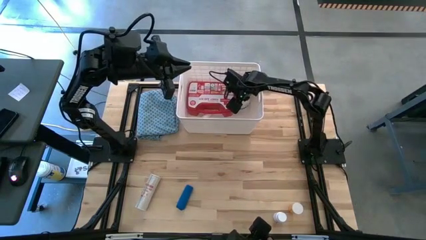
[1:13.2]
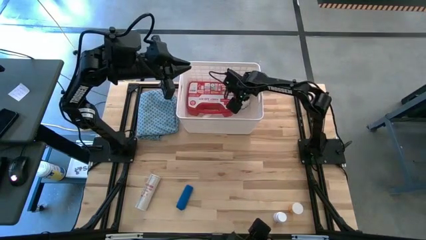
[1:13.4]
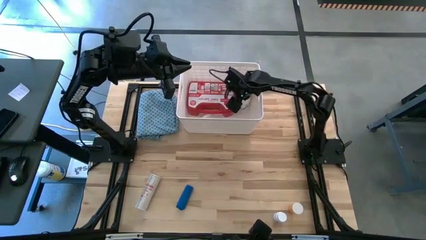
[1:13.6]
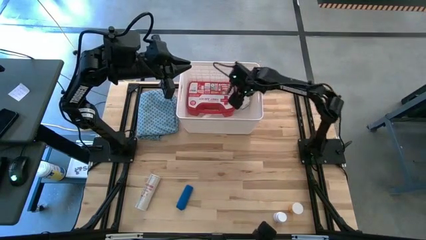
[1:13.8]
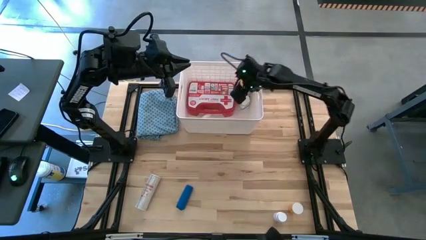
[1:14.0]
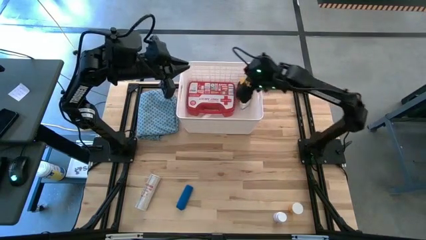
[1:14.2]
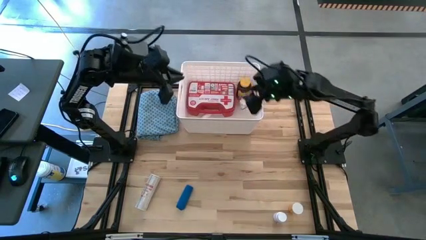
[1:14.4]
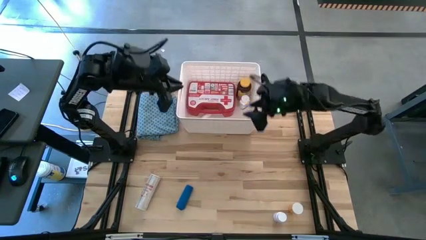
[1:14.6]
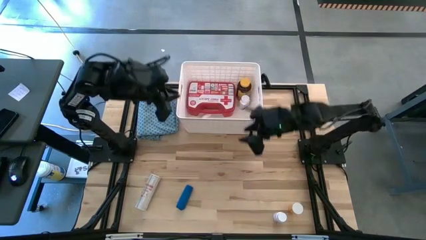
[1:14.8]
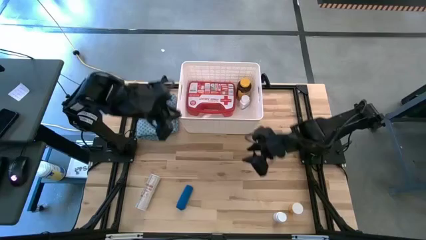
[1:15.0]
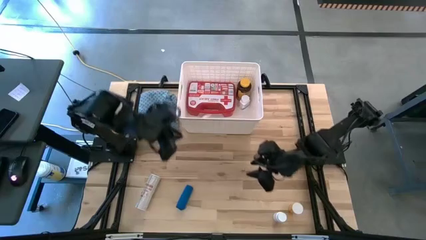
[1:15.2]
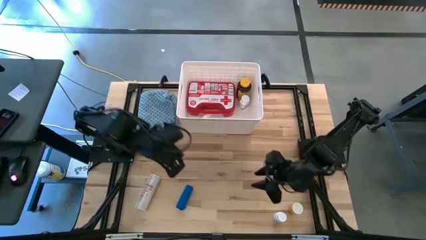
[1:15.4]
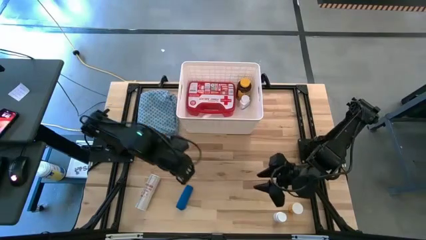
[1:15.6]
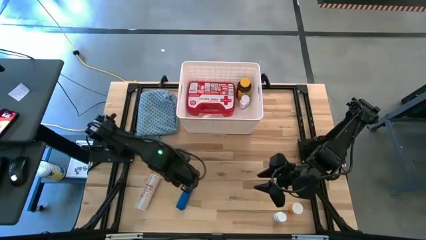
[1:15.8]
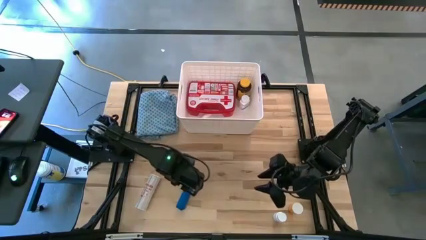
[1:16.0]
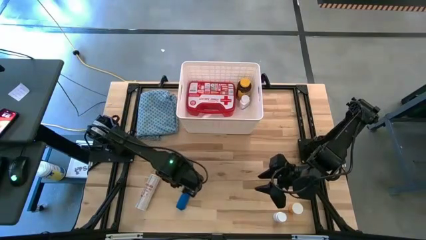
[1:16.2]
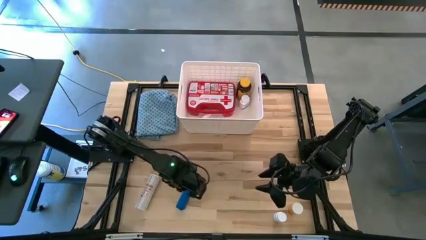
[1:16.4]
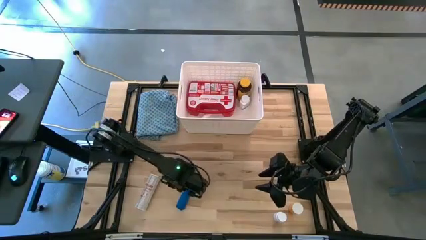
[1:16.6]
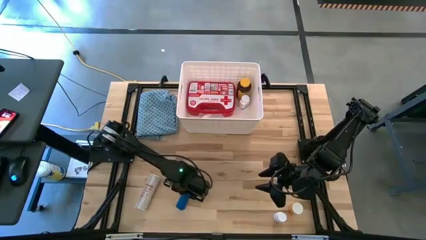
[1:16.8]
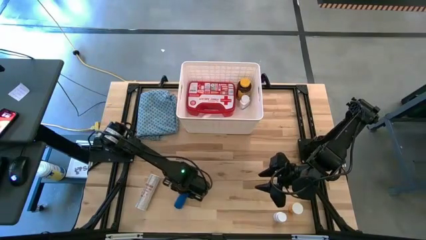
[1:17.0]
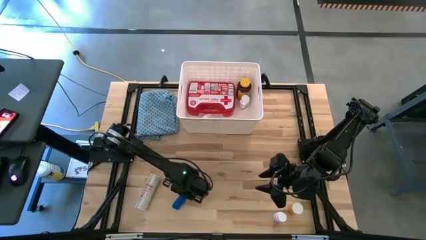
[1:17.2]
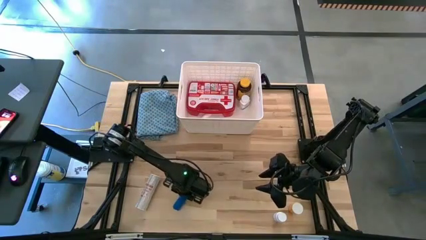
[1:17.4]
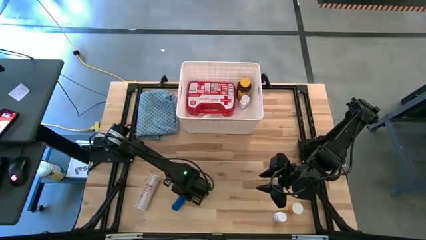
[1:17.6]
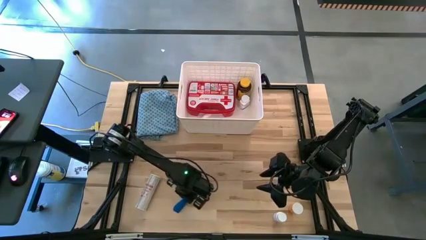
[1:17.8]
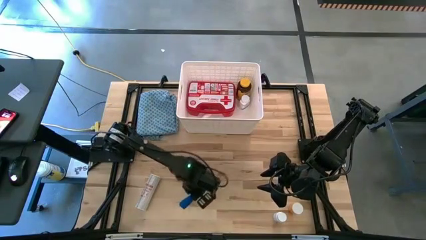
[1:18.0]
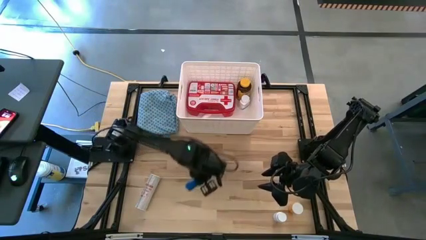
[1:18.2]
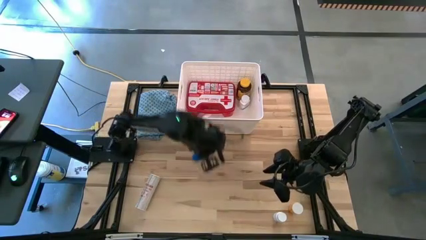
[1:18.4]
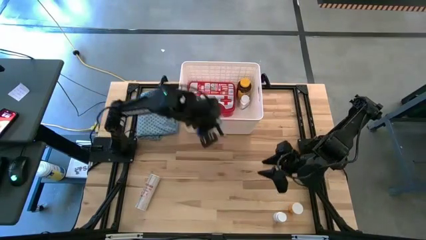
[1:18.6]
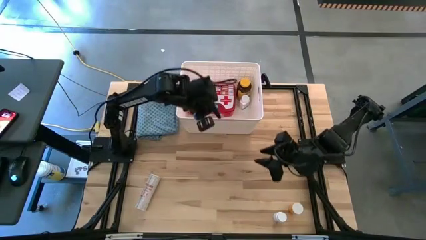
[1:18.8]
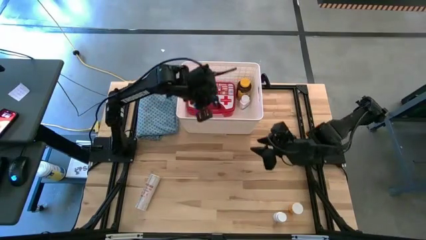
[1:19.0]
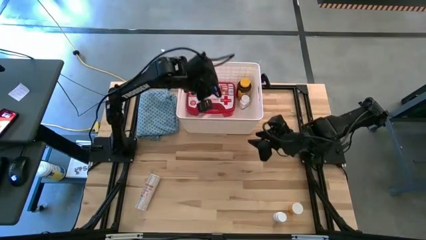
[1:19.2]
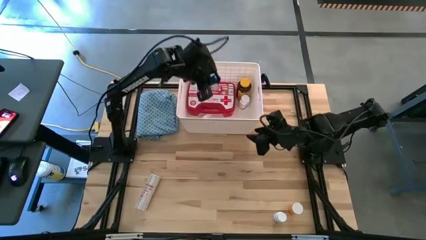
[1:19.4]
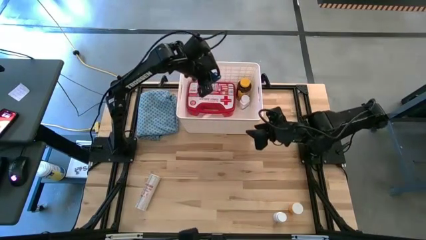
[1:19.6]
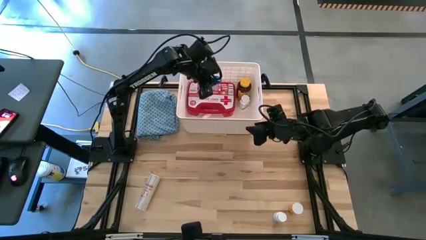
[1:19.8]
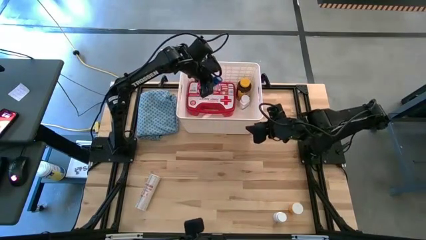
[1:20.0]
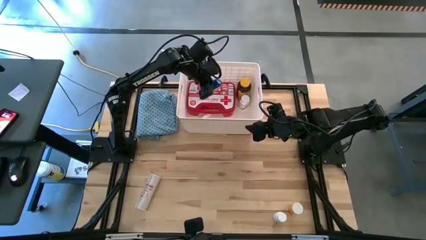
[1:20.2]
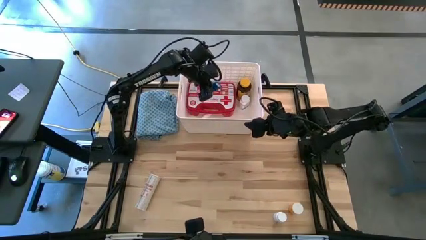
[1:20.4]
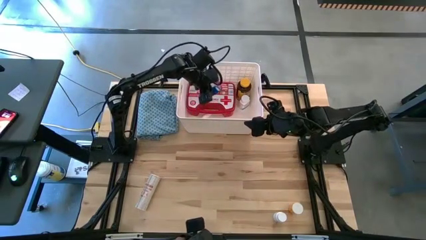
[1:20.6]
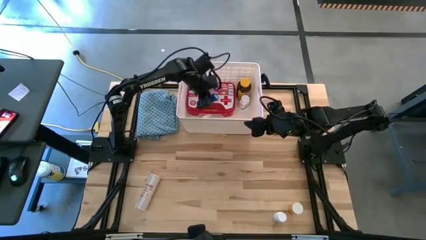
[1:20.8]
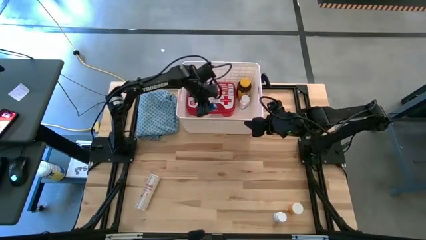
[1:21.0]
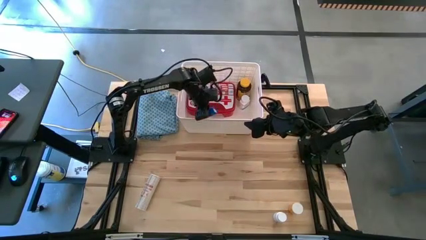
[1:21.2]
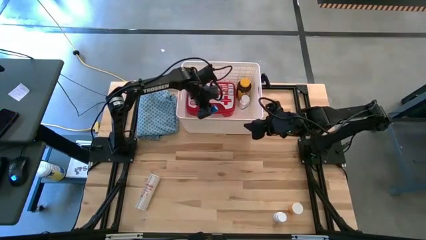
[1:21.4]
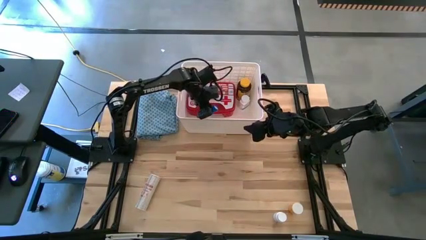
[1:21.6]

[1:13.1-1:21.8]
Task: Pick & place medical supplies in basket/bin
Put the blue bandage into the white bin

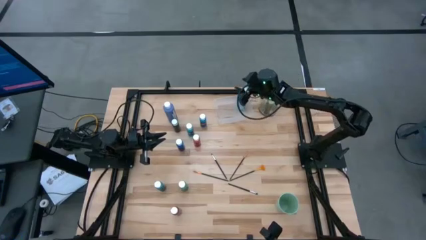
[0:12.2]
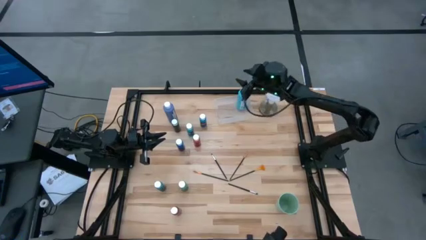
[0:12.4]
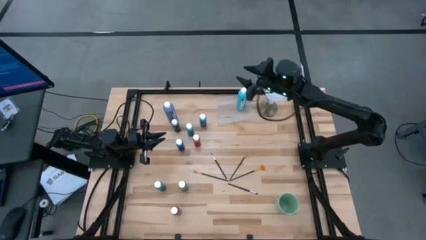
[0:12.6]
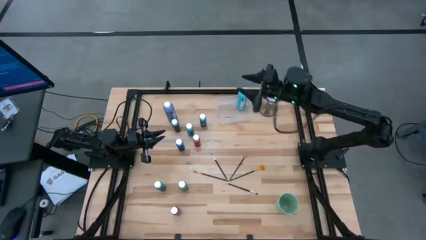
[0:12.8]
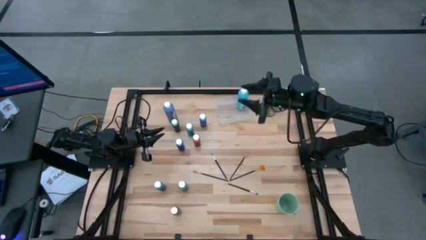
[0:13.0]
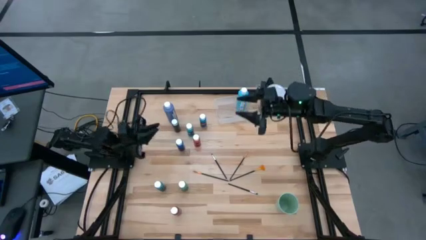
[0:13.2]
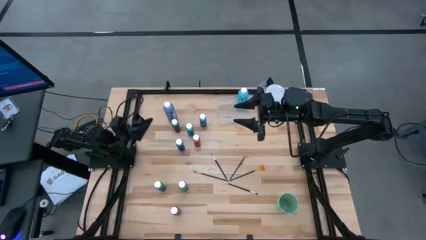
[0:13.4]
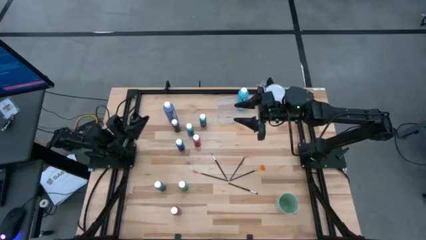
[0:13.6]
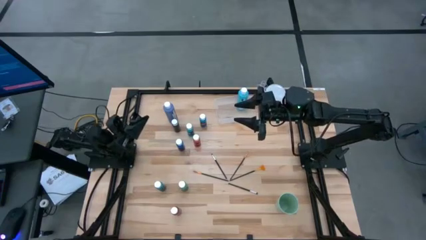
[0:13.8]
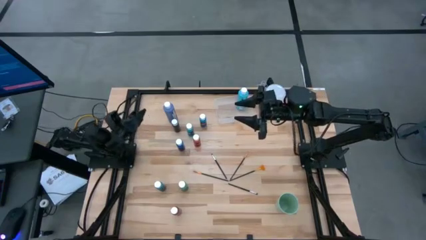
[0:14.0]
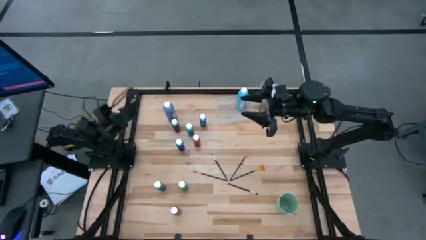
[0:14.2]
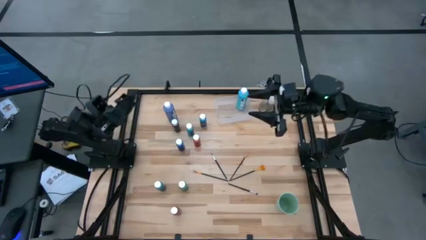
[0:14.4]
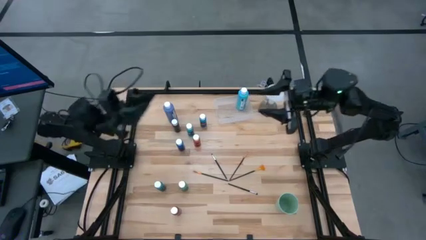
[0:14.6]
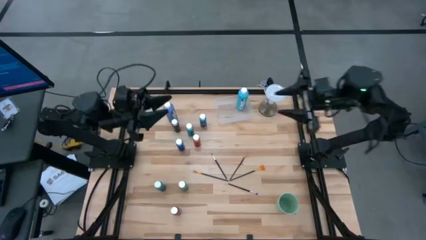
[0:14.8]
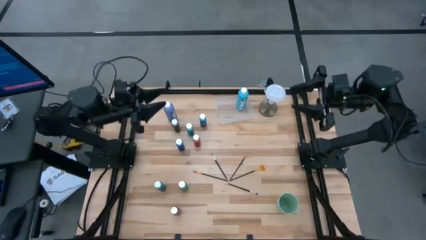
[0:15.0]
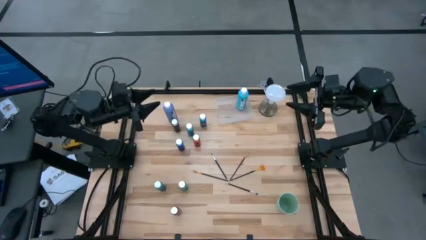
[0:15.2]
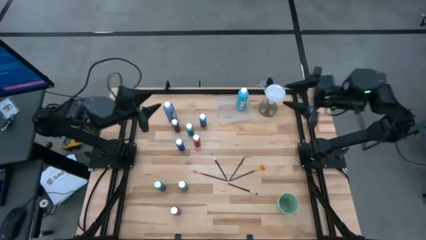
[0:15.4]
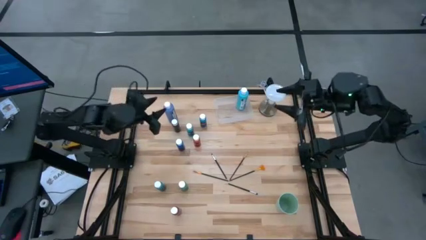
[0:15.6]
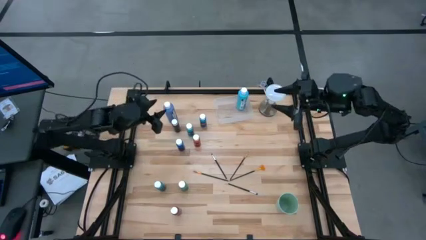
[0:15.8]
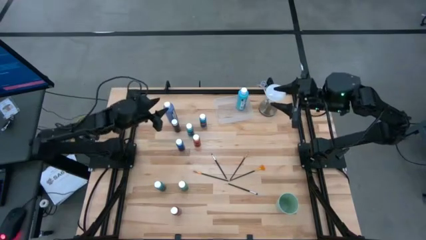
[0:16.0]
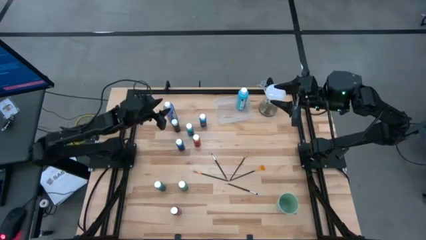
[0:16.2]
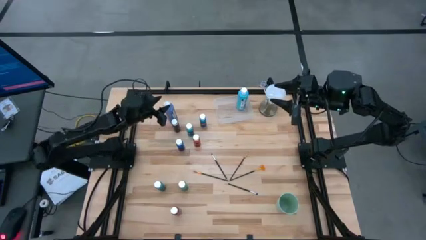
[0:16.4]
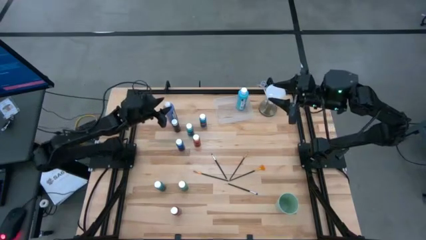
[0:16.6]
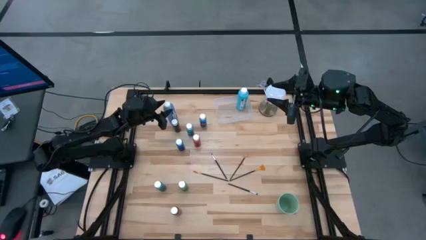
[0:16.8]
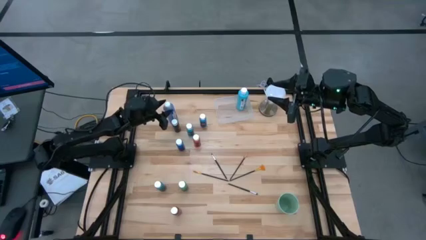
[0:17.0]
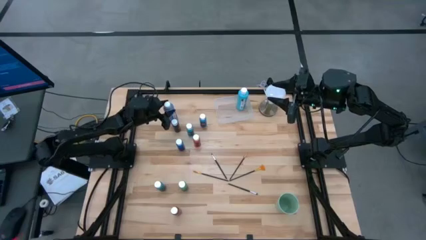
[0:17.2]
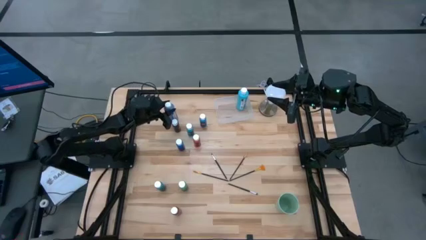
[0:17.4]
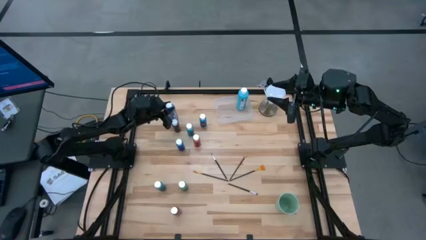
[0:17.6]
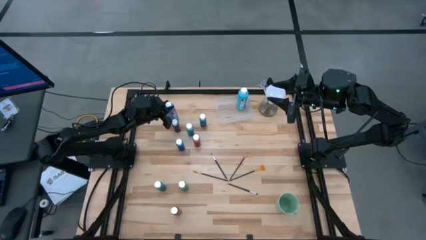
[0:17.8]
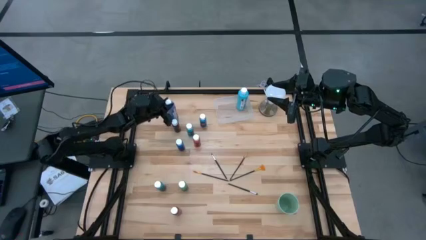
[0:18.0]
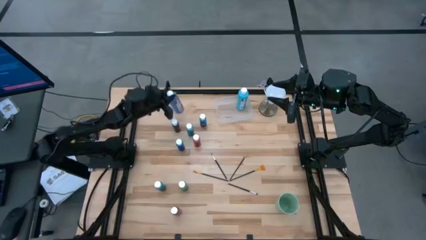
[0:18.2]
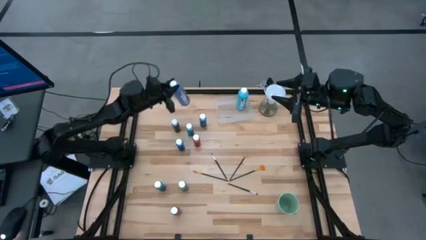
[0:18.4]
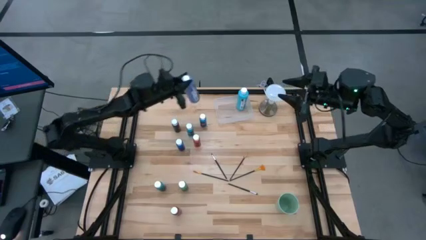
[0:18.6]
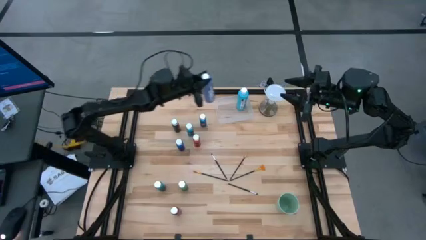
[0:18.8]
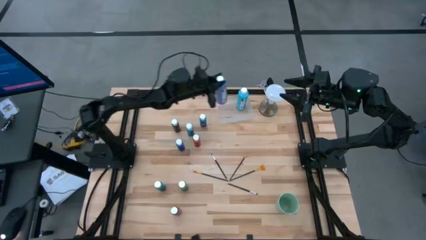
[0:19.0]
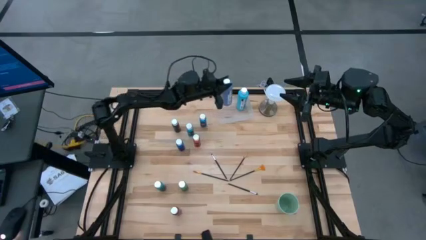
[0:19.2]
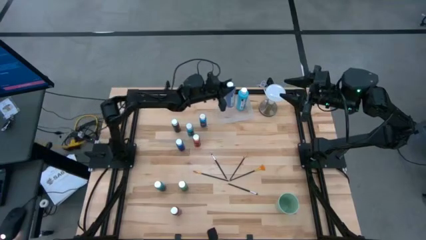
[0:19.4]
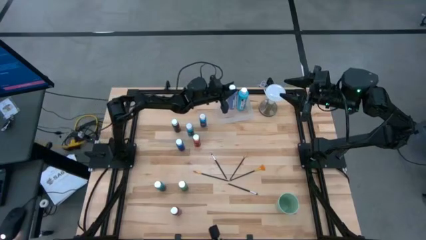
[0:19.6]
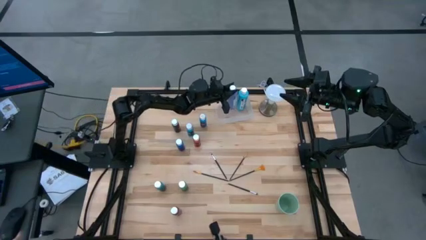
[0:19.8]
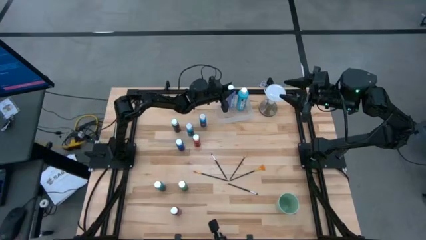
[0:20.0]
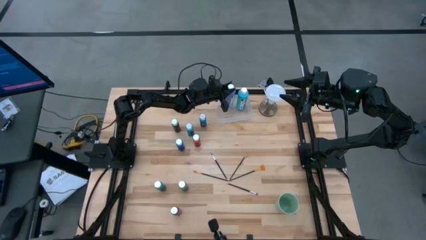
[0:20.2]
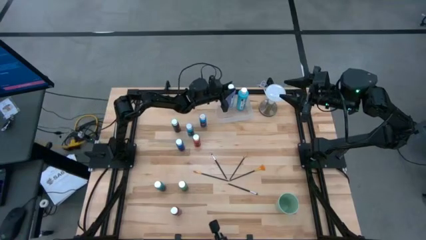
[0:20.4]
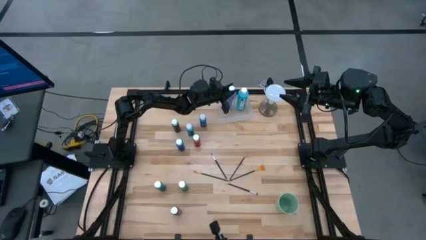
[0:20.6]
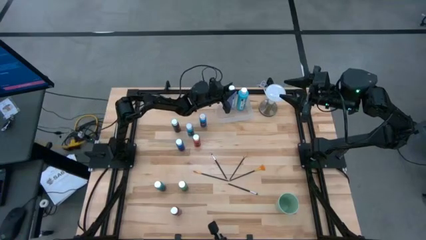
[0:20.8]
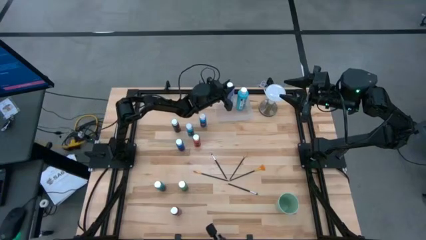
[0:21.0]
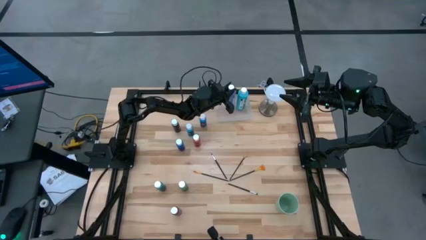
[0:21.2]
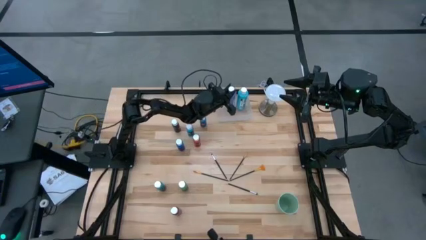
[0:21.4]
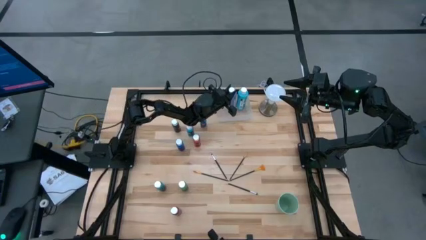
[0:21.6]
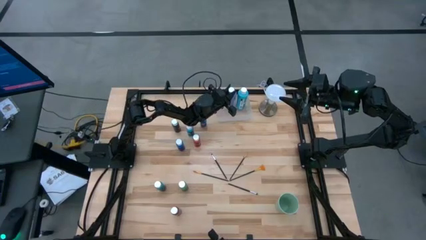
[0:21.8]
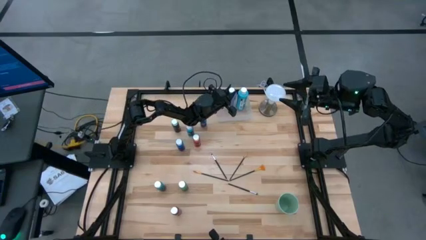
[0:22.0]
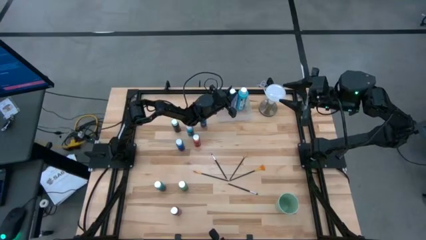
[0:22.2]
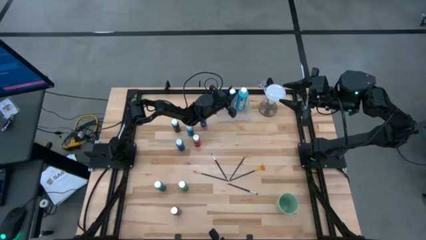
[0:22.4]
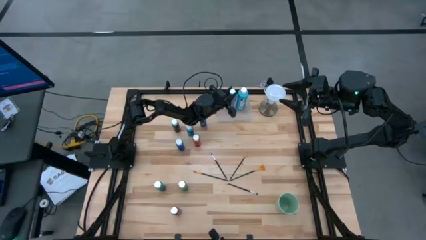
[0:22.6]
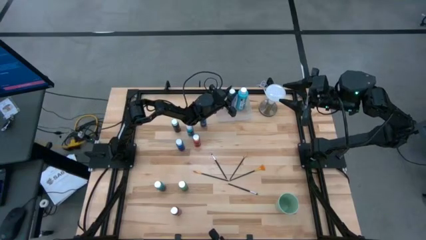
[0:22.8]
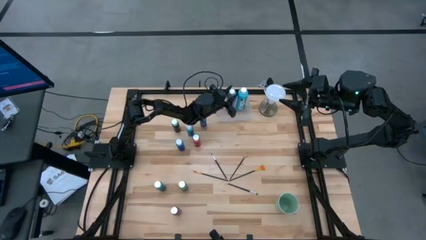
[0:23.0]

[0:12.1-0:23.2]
Task: Pick & Place Paint Supplies
Put the large purple paint bottle into the transparent bin
